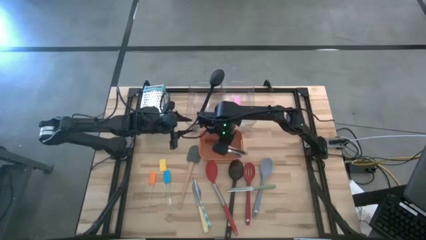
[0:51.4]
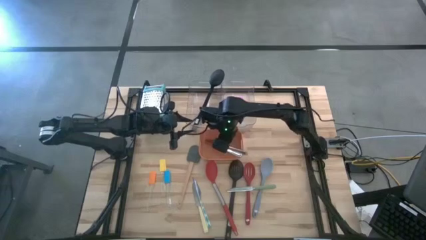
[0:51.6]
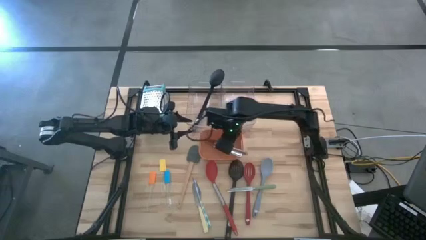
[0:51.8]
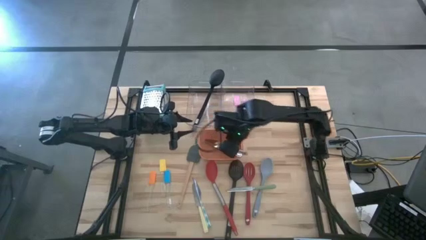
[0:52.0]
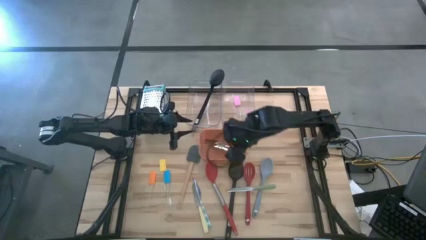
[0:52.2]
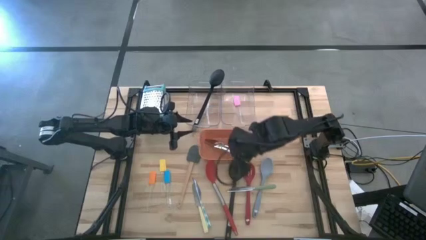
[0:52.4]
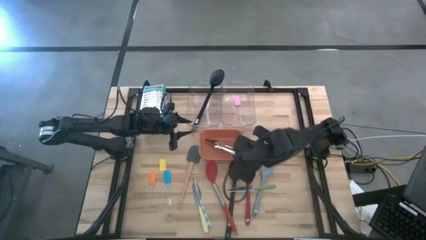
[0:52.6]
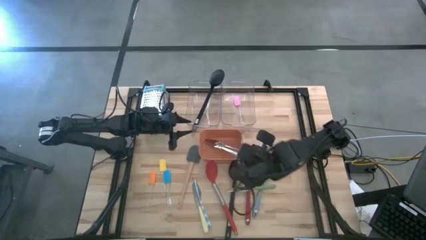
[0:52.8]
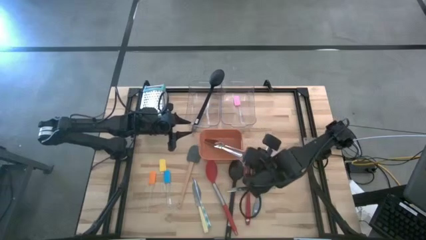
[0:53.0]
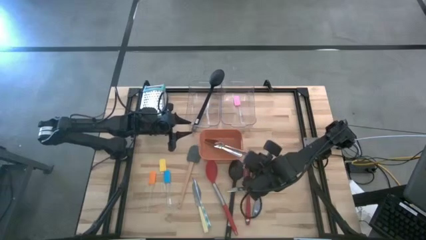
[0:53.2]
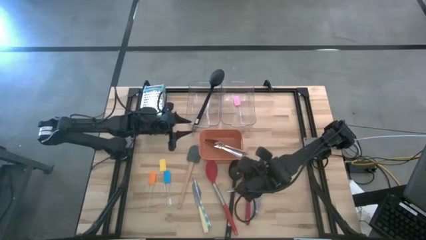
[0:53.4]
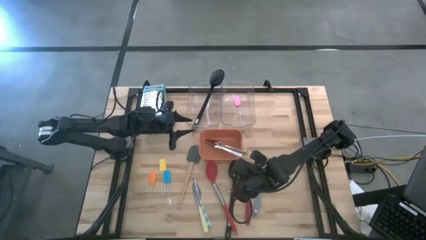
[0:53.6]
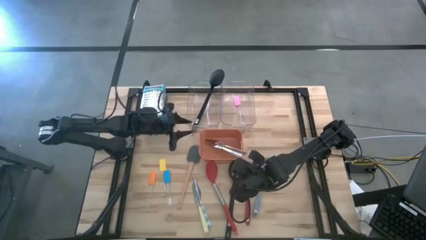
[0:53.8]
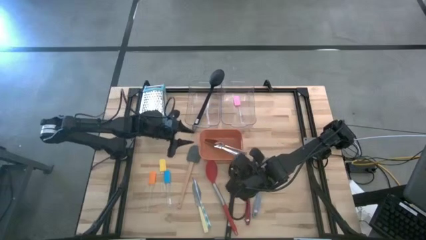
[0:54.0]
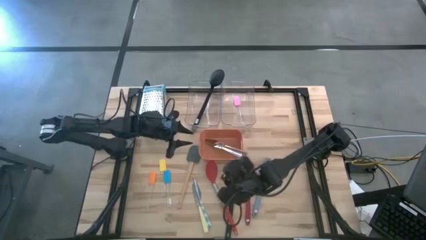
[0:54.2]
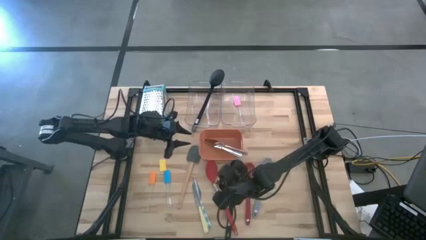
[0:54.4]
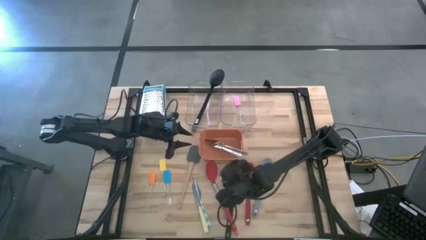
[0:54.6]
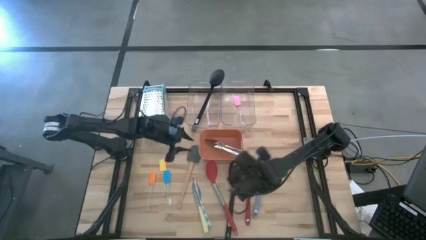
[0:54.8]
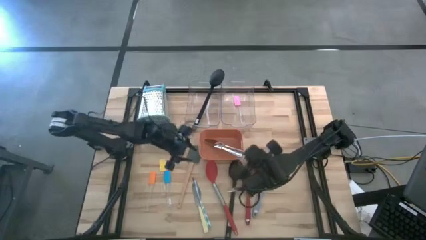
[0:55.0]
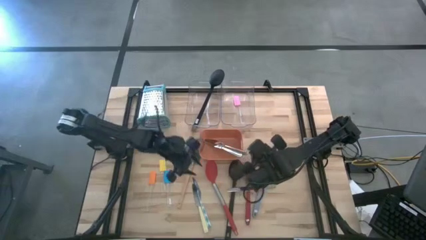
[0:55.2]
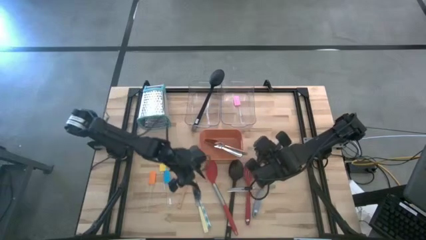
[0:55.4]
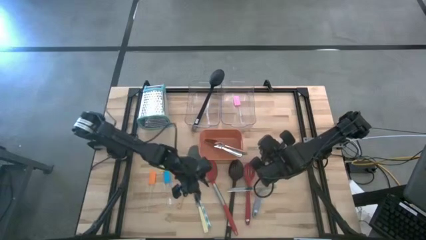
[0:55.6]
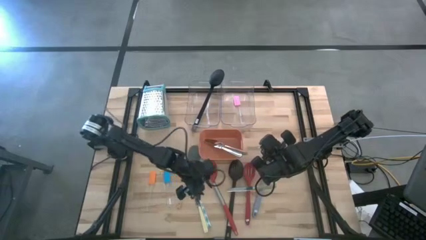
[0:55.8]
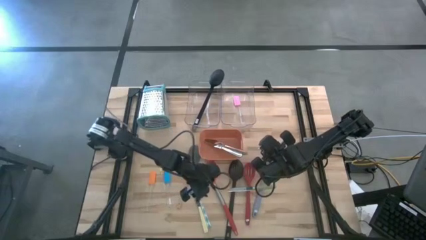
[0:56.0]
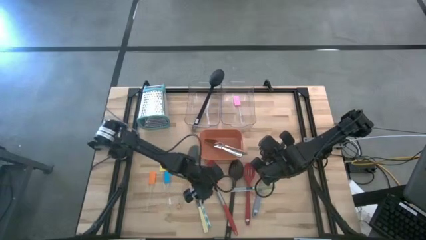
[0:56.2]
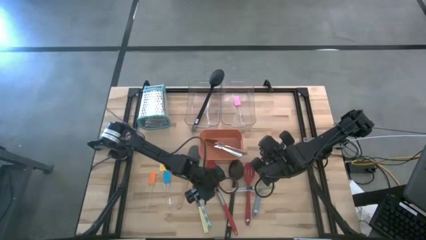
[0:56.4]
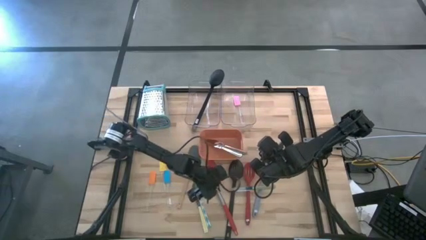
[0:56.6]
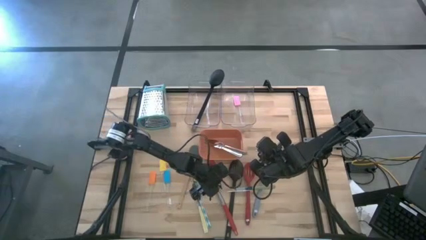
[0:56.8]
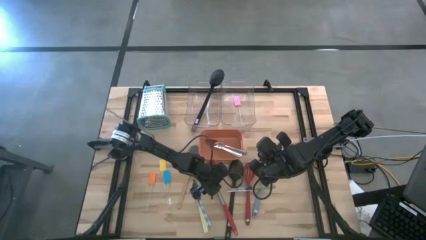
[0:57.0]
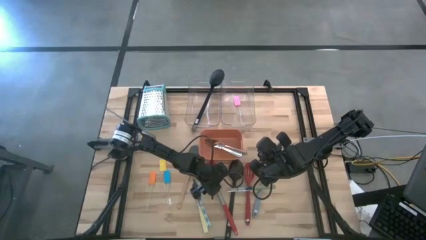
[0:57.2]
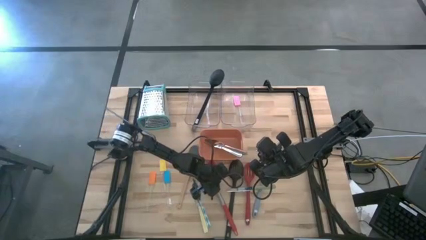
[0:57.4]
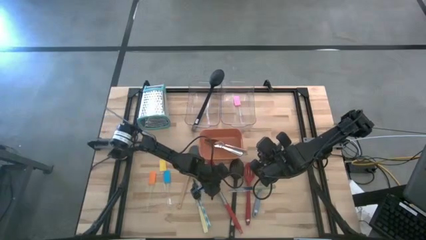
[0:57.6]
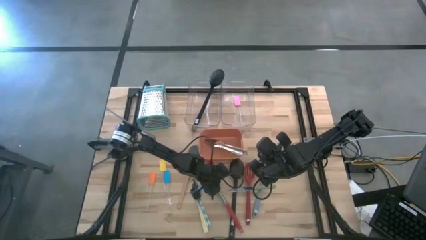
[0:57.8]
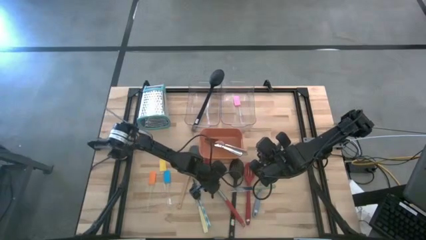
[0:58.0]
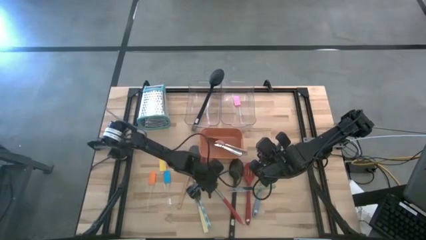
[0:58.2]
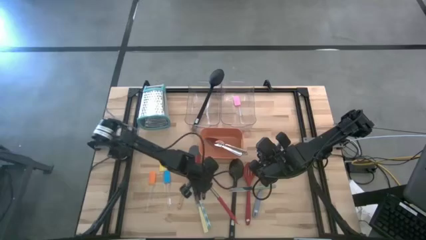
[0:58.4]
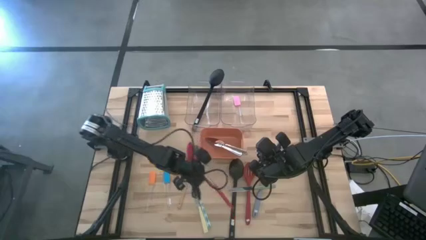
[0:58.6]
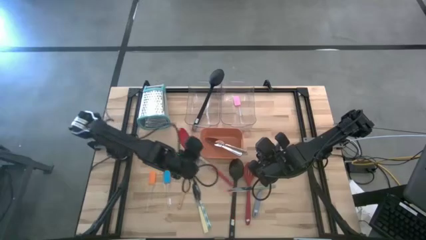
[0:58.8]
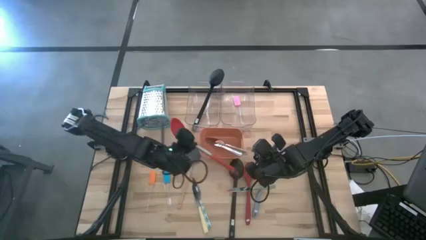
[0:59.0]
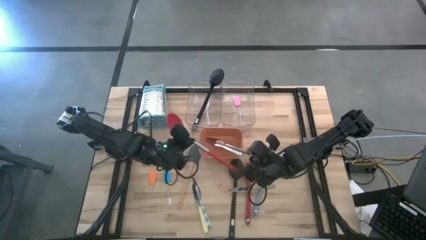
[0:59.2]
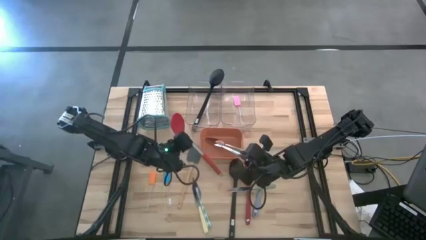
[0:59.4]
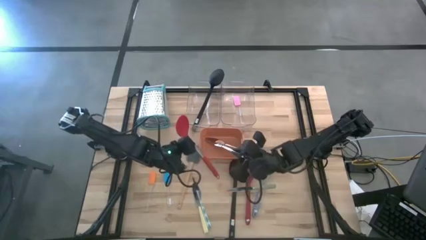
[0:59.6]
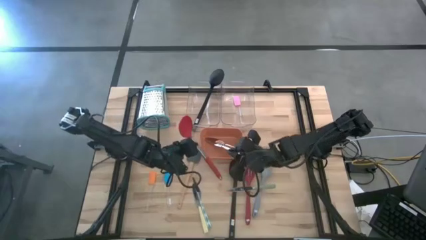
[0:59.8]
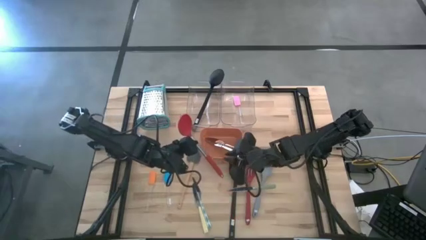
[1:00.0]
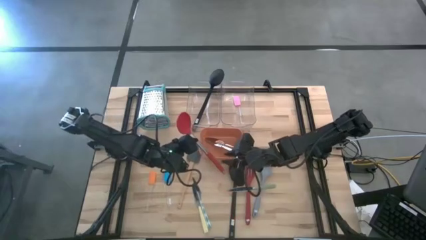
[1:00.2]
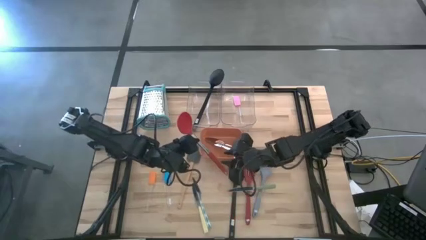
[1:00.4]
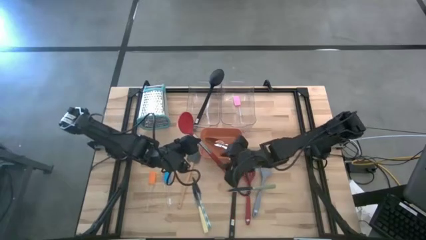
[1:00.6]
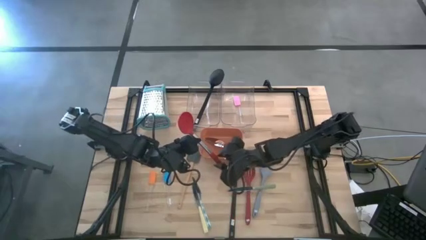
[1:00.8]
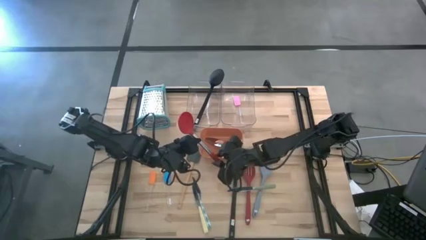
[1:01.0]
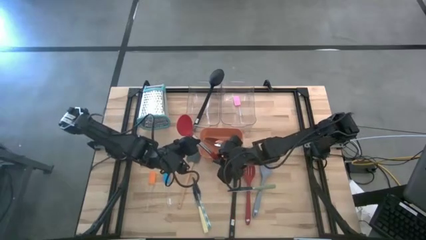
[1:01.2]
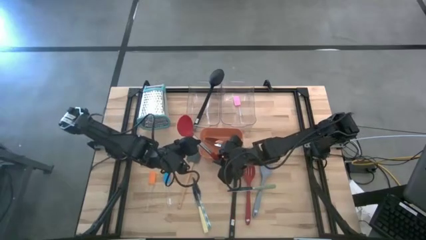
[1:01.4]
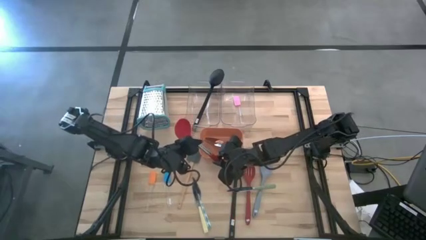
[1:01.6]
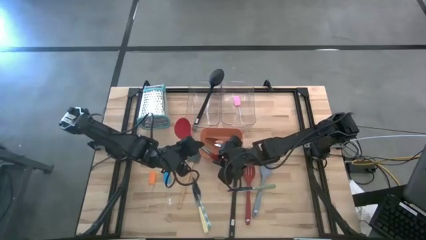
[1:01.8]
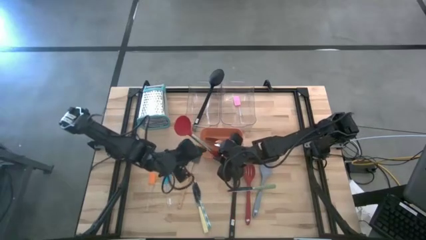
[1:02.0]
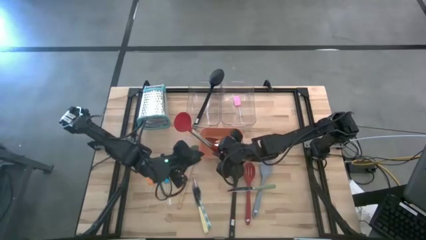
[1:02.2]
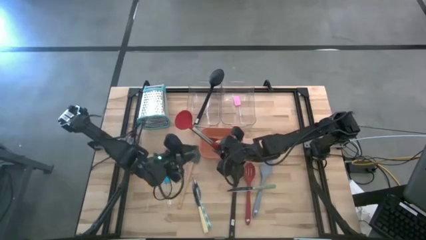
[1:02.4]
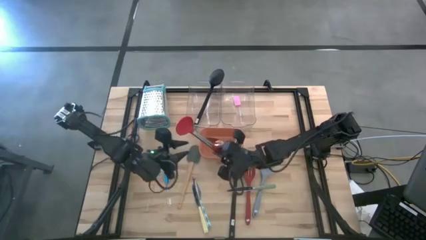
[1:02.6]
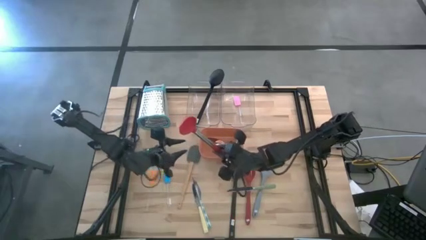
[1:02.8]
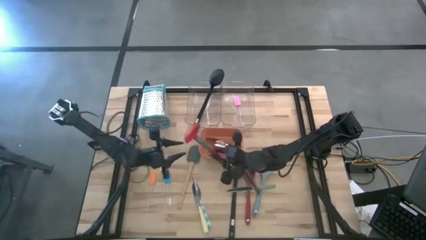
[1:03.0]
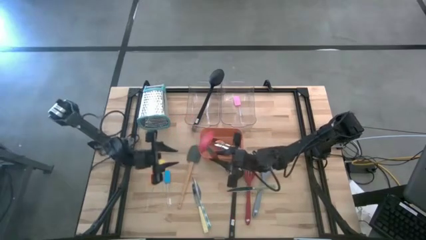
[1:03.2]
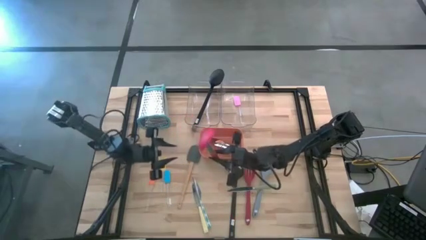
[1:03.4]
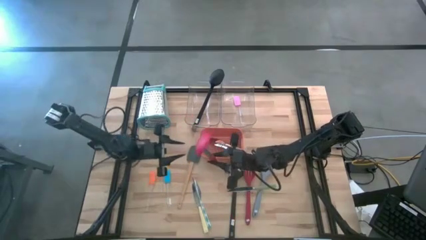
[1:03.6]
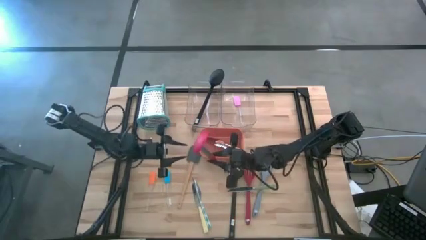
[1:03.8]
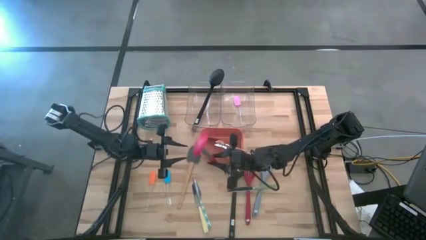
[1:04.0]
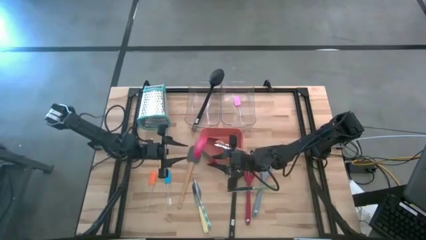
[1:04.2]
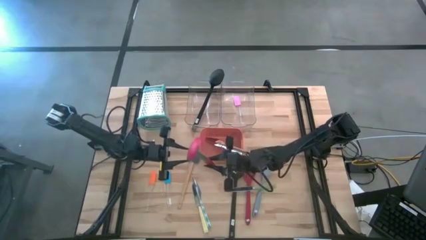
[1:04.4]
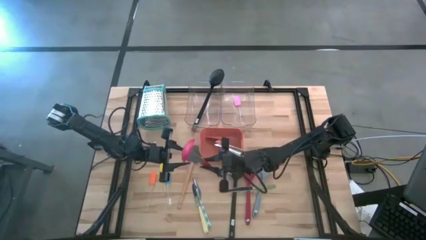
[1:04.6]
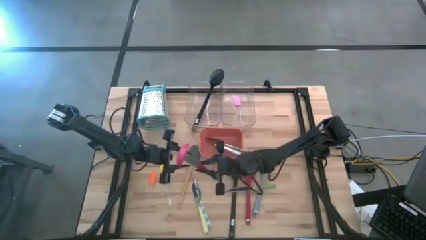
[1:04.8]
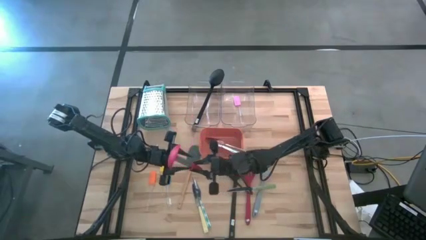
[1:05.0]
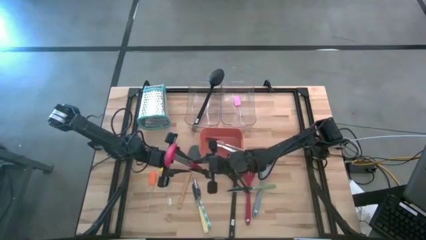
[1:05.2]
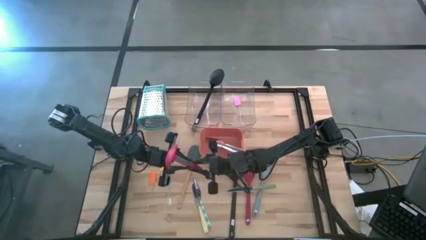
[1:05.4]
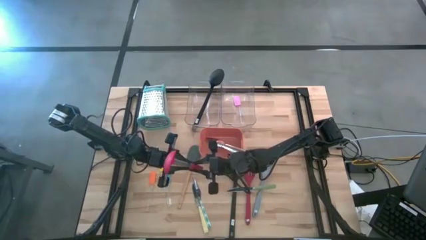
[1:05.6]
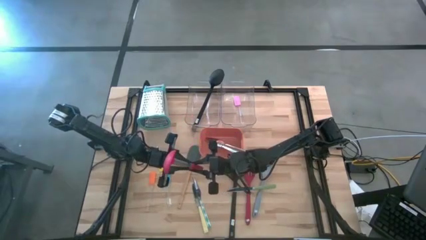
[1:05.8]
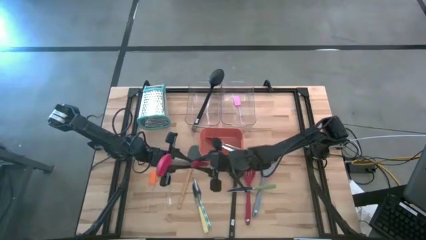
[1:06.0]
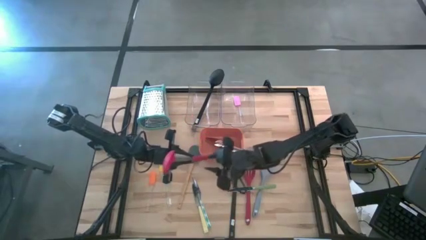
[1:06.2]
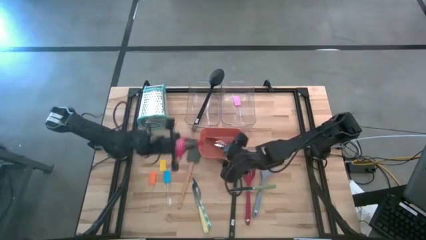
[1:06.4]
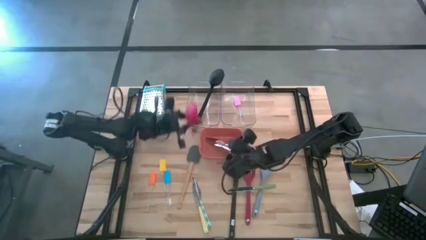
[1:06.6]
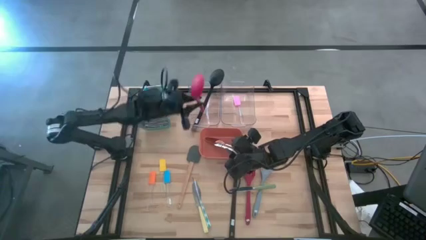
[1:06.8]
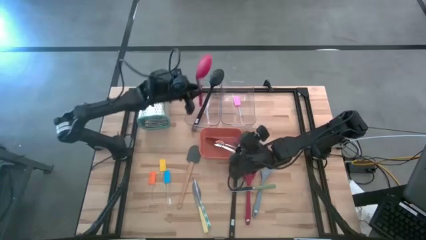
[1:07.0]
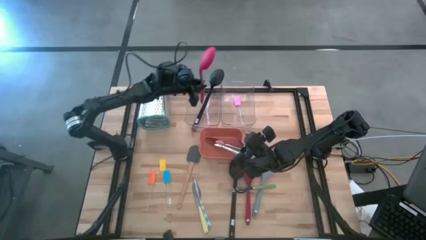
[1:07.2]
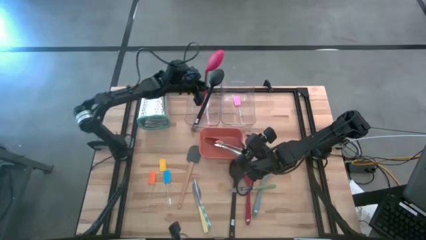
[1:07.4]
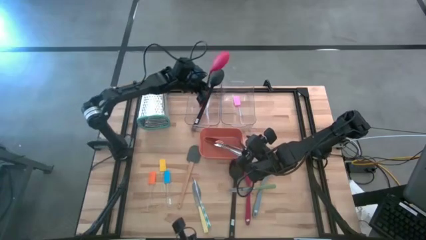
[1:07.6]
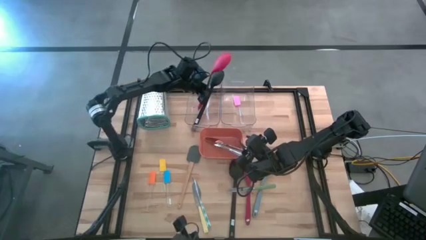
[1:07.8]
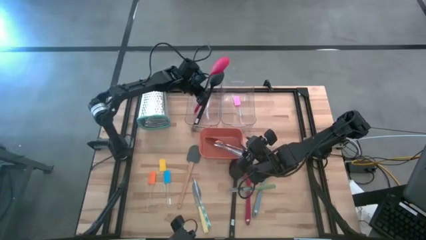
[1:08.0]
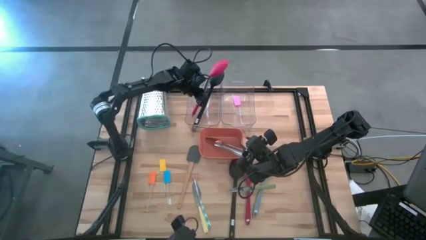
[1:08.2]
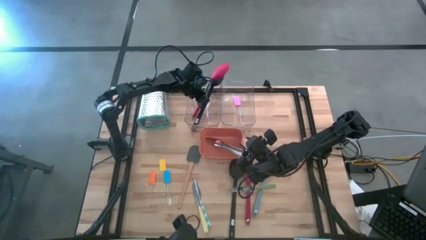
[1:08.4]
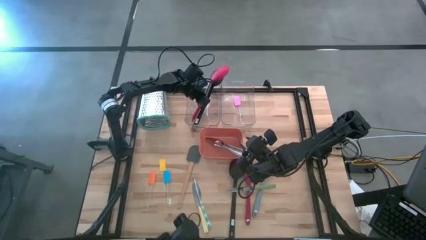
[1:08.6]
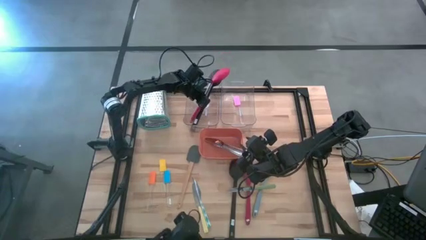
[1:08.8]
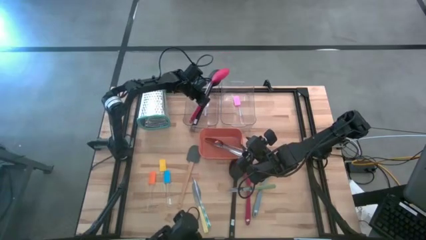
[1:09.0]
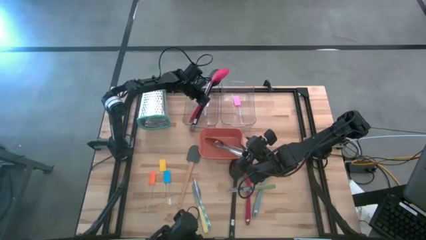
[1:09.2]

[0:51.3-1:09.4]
Task: Pick & Place Kitchen Items
Put the red serving spoon into the left transparent bin
